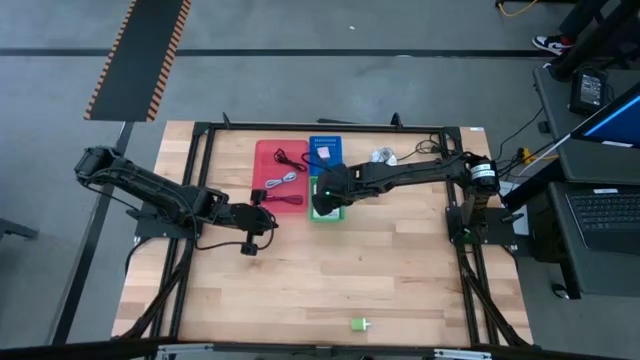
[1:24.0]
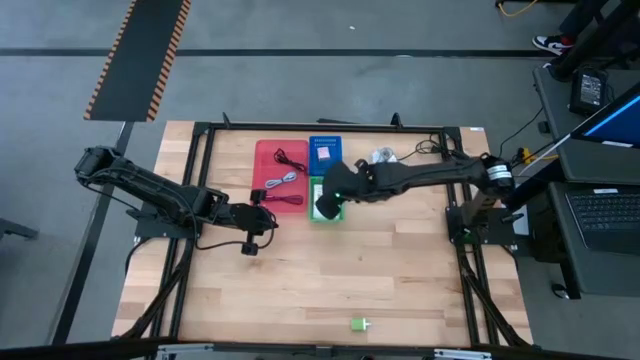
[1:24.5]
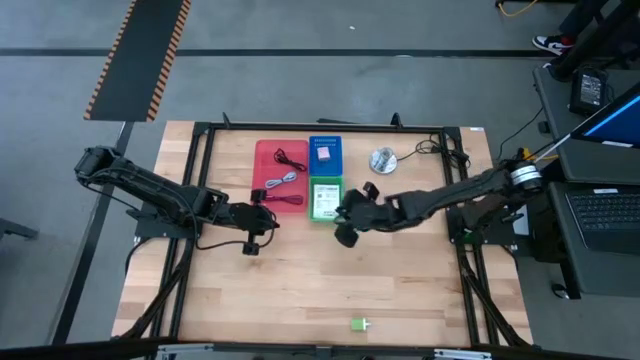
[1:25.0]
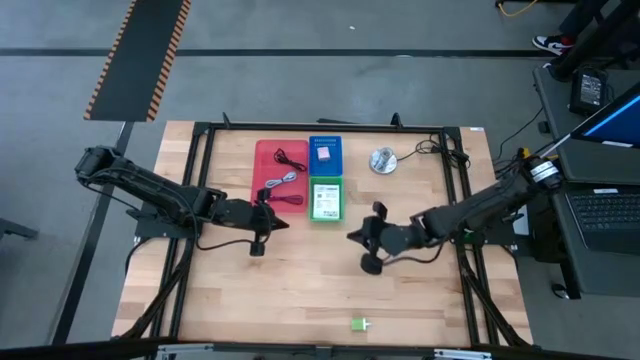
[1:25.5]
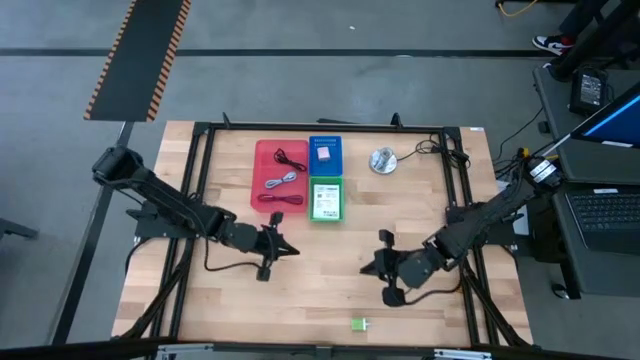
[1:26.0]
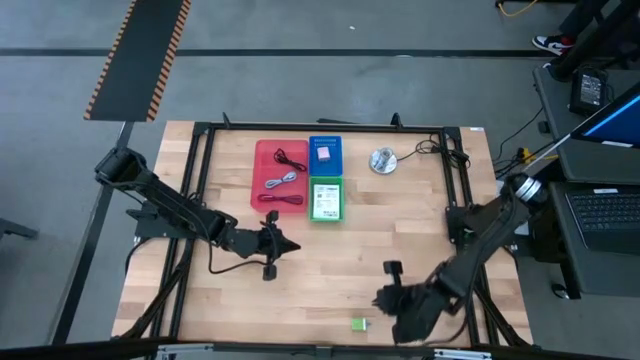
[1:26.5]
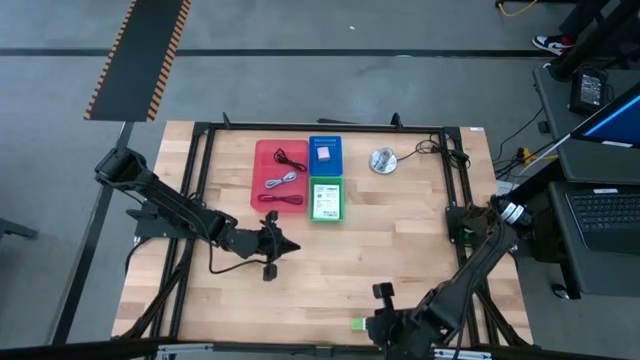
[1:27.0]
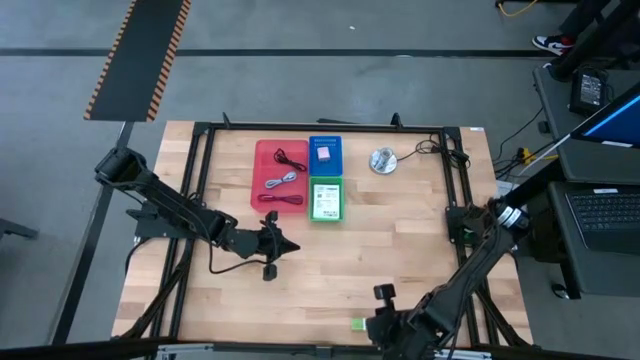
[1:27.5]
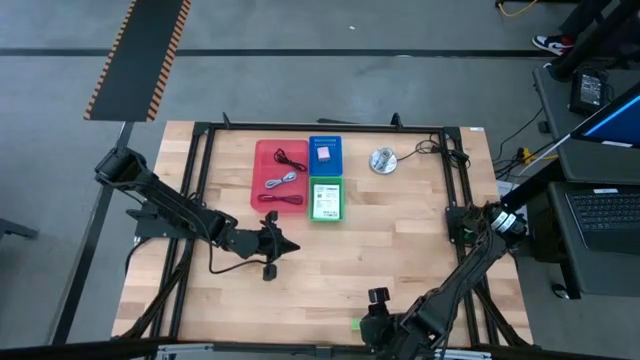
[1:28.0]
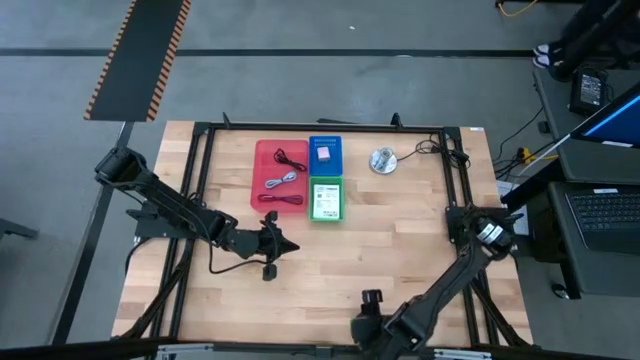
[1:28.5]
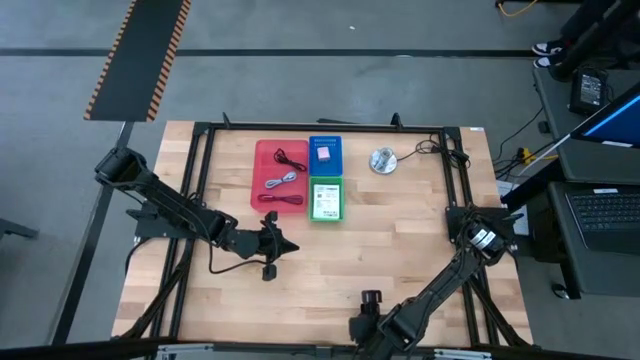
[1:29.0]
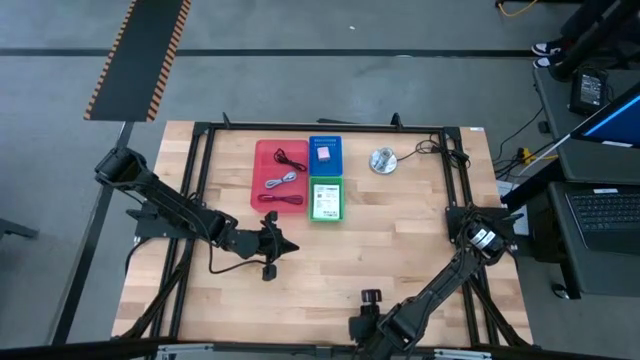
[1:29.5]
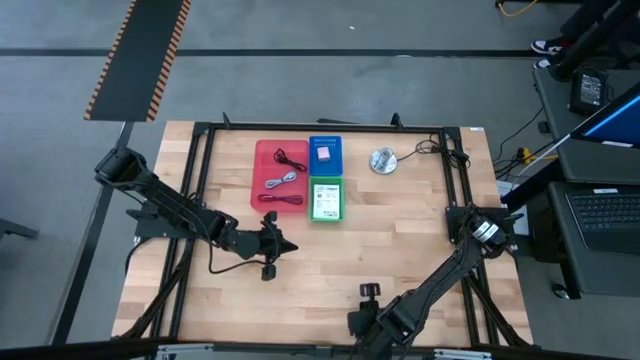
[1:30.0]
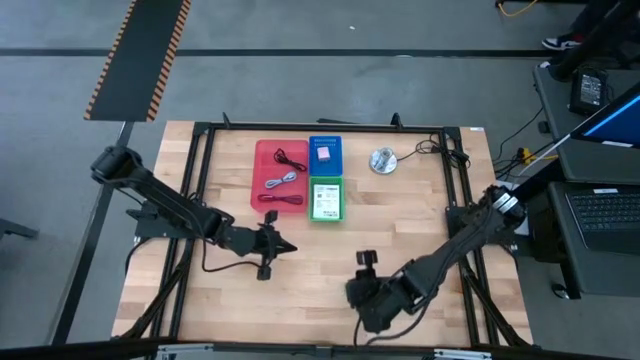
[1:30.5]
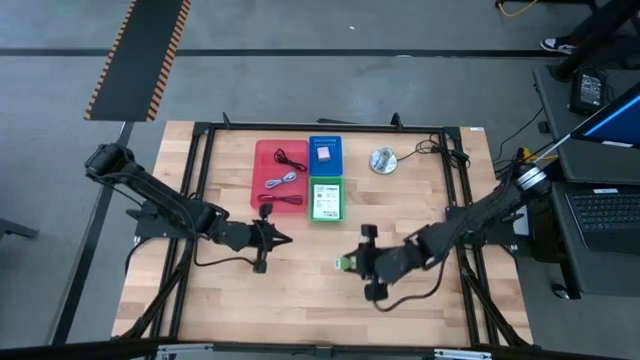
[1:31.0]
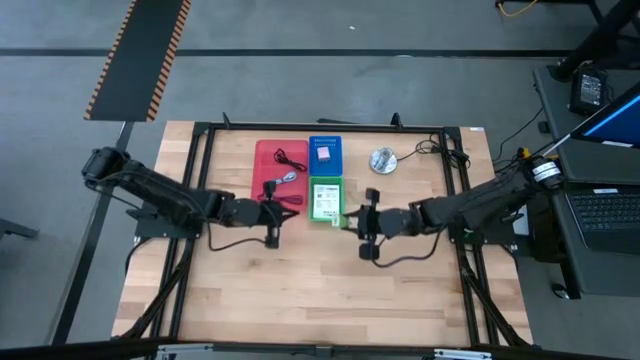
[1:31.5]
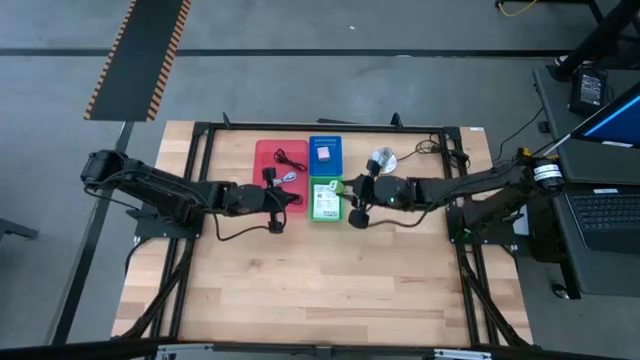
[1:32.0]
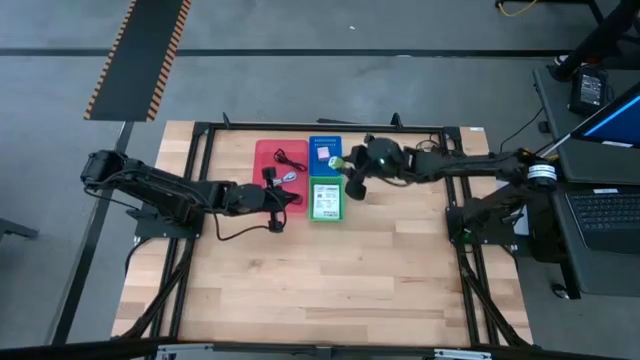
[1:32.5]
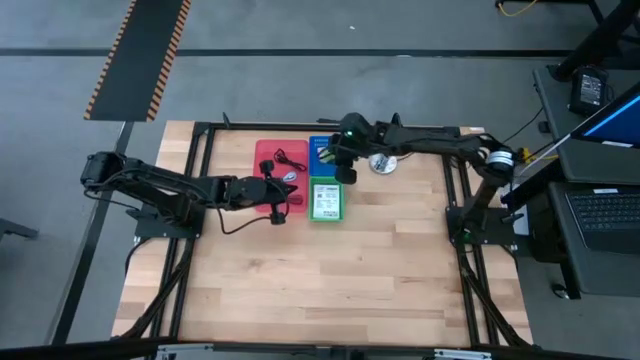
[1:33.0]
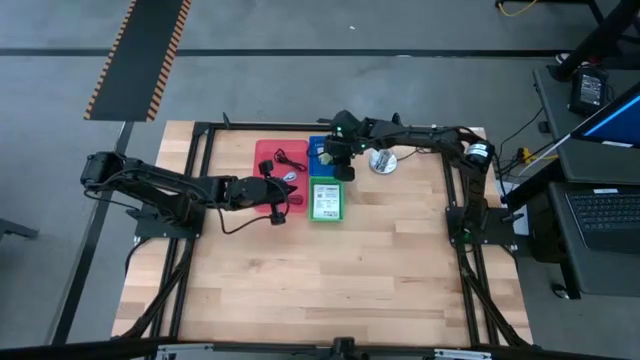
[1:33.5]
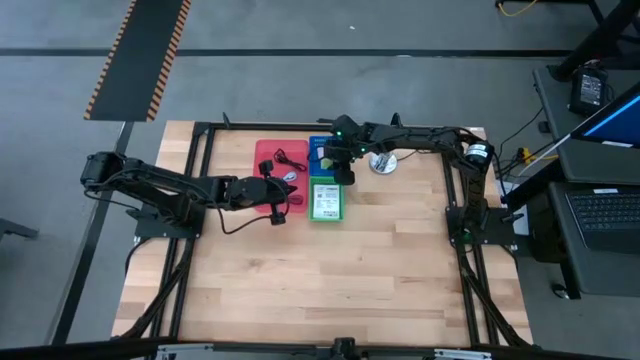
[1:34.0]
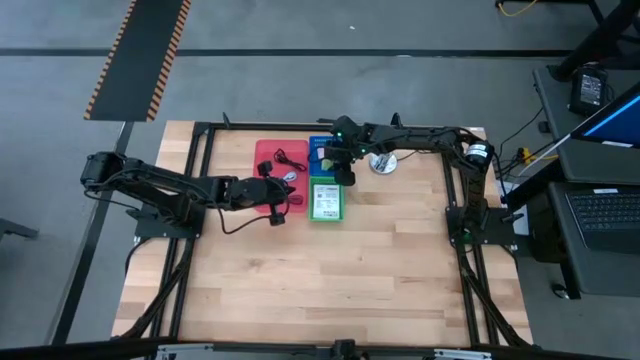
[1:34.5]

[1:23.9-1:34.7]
Task: Pick and place items into bin
Put the green charger adapter into the blue bin

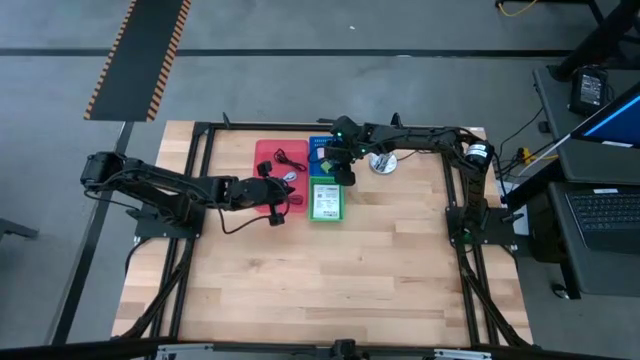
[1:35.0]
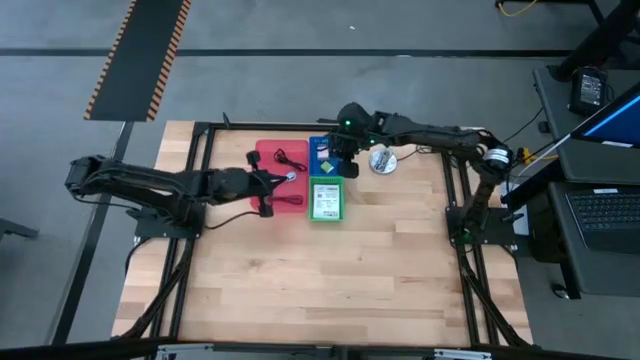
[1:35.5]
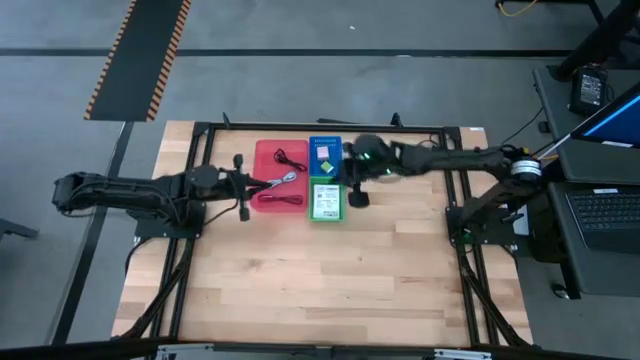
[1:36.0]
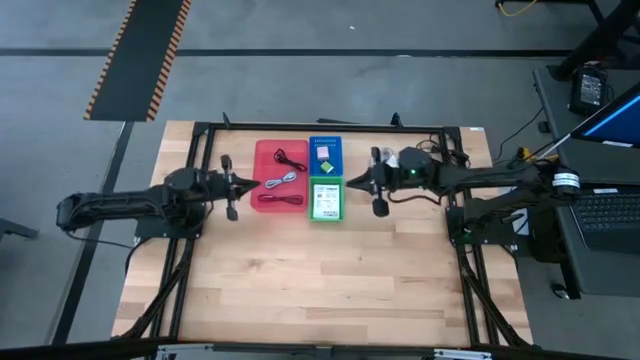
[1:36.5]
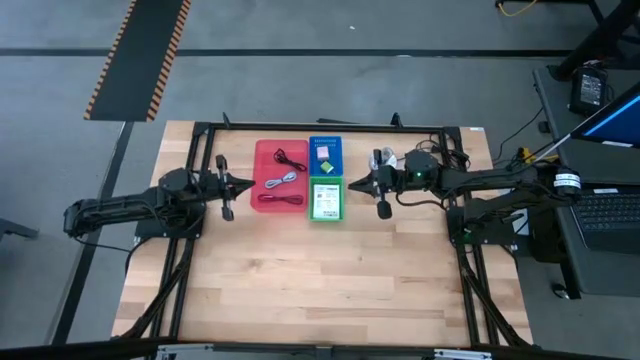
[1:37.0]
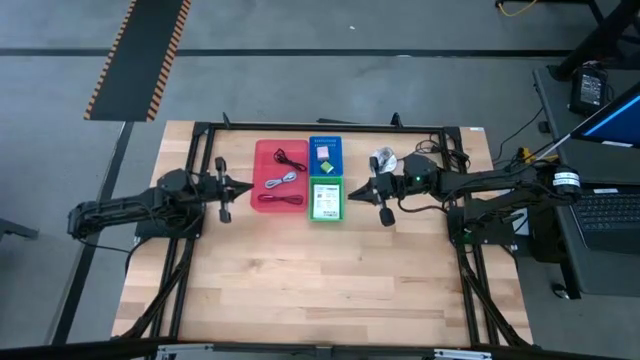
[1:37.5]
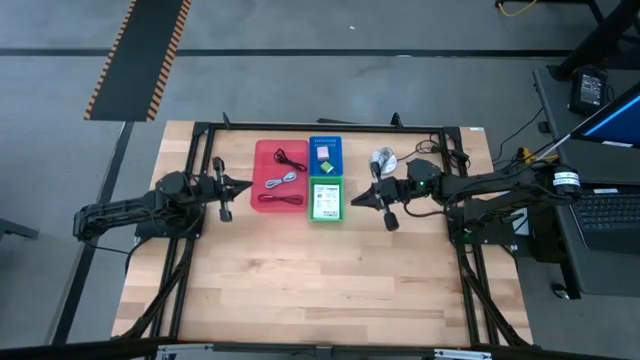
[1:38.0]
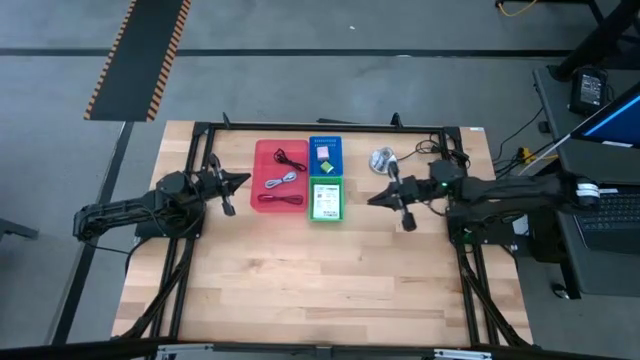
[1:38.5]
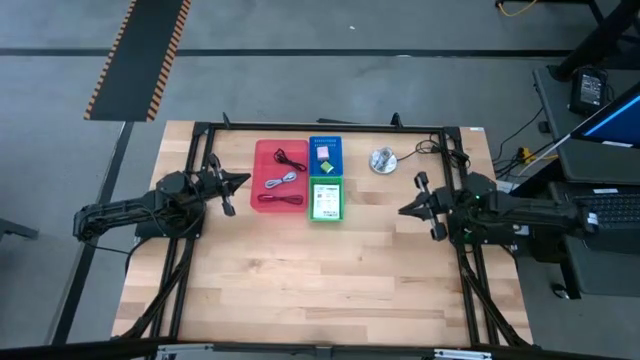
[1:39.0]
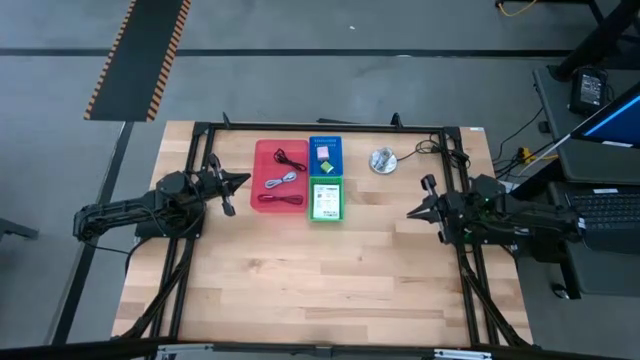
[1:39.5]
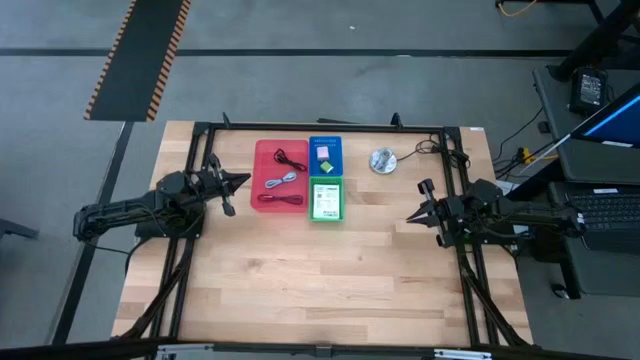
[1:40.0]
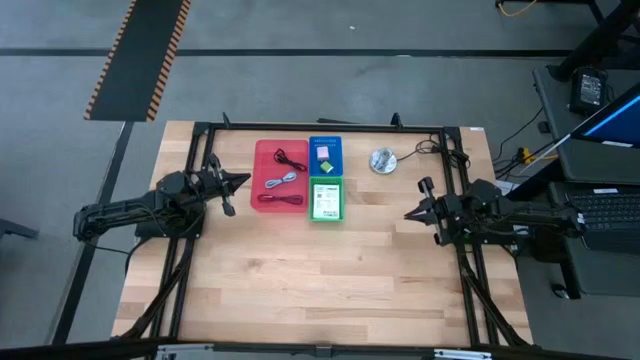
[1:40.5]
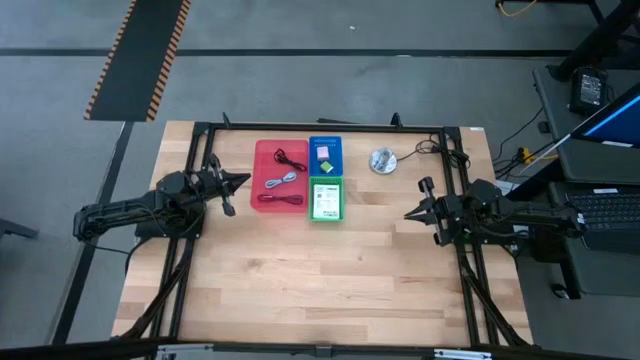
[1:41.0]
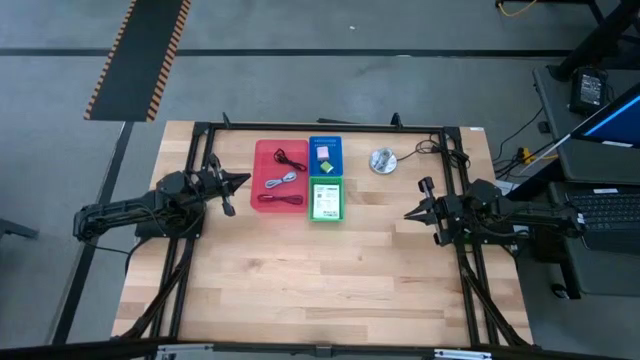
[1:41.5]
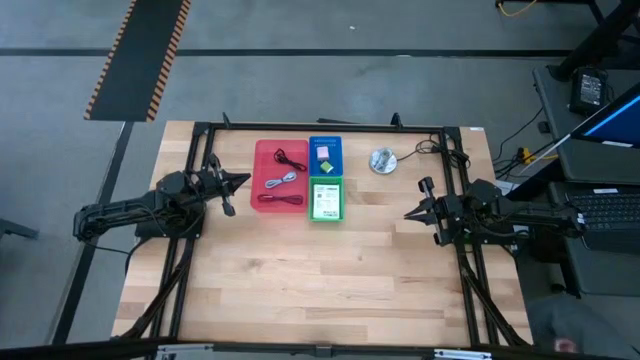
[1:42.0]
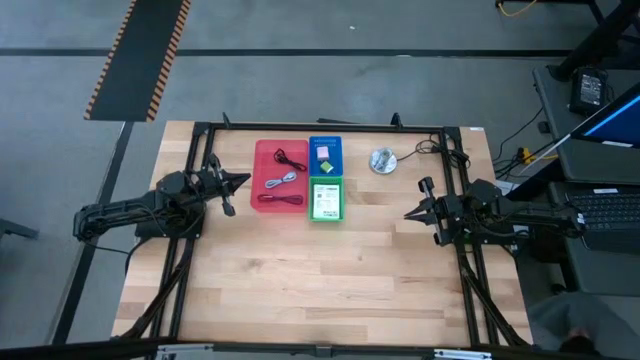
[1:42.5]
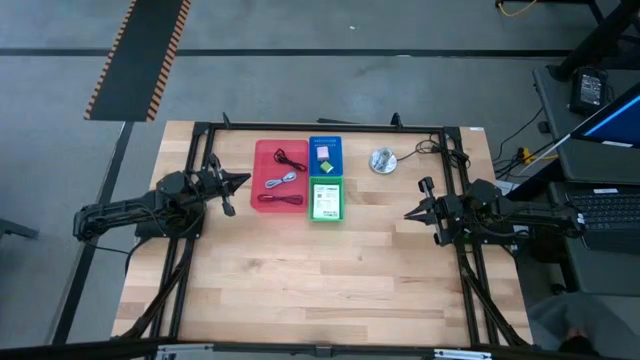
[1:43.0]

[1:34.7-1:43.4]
Return to Home Position

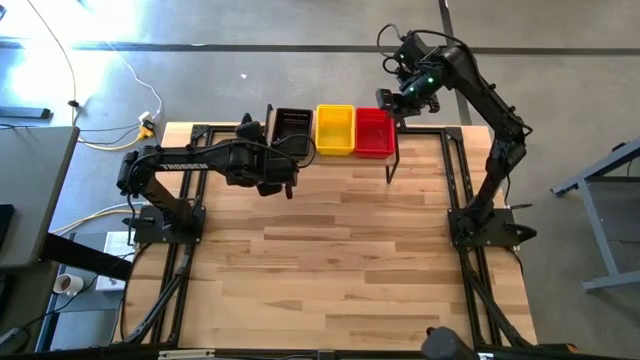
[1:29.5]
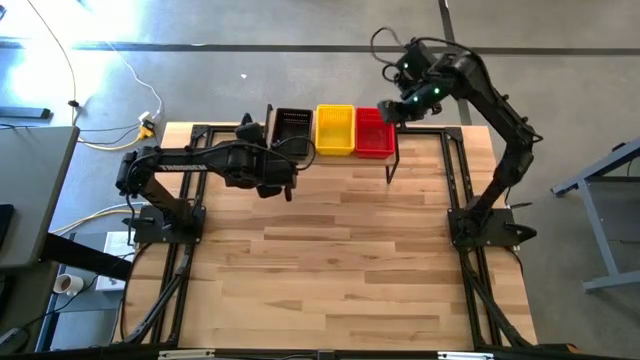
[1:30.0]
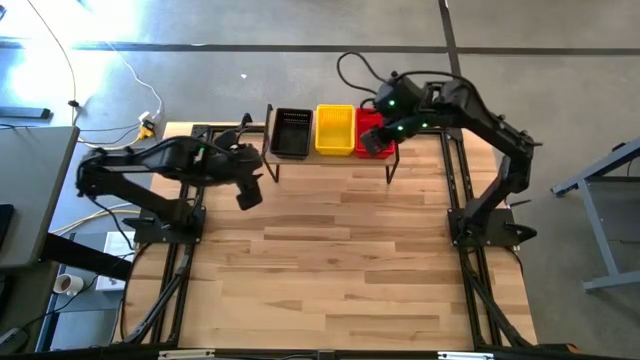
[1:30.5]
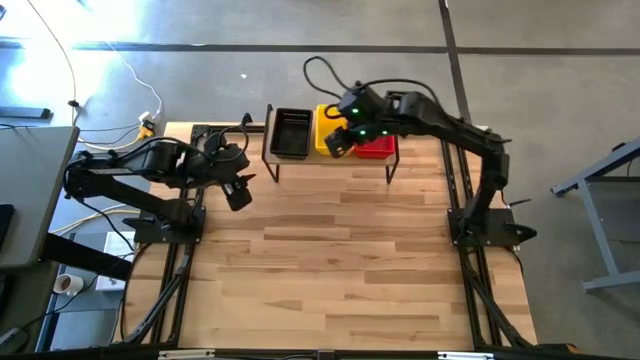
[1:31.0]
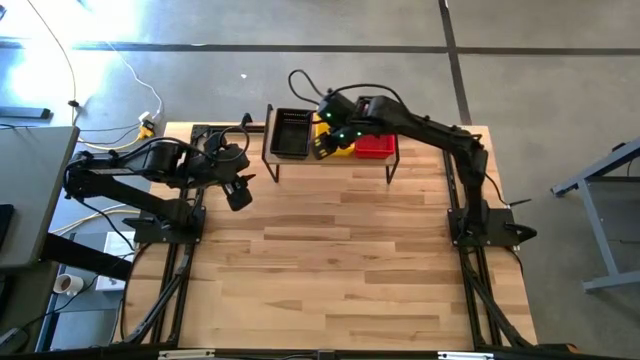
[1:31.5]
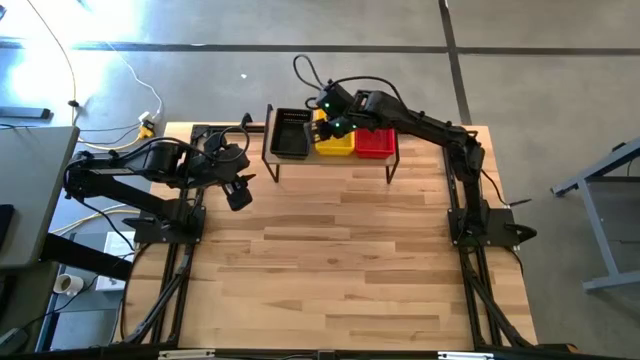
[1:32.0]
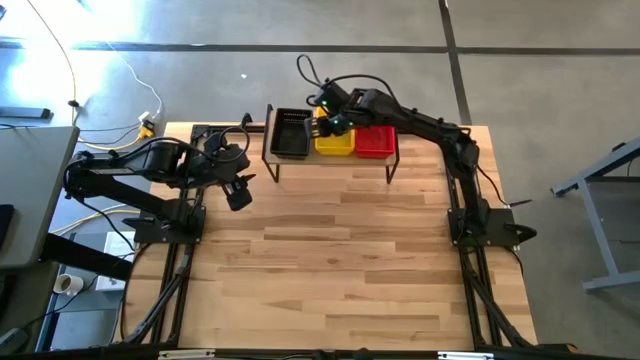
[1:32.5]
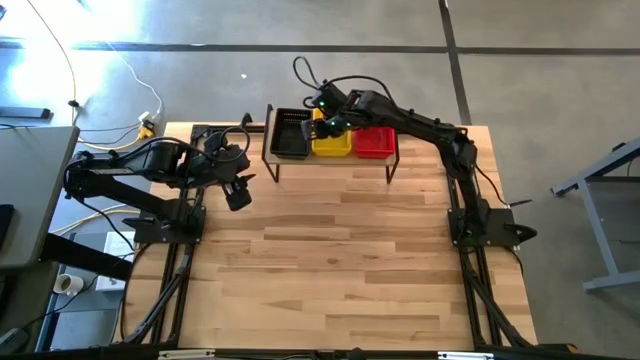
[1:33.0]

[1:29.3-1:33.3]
Task: Stack baskets on shelf by color
Adjust the yellow bins on the shelf
